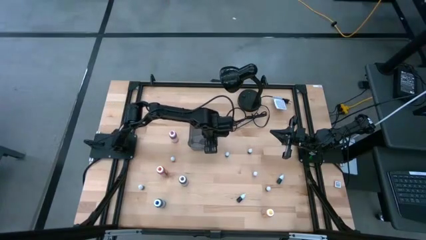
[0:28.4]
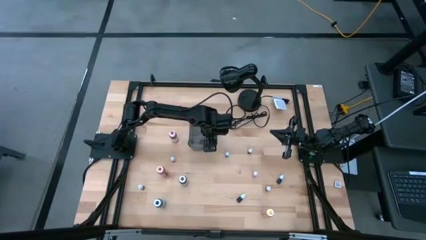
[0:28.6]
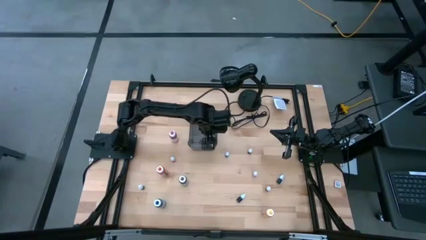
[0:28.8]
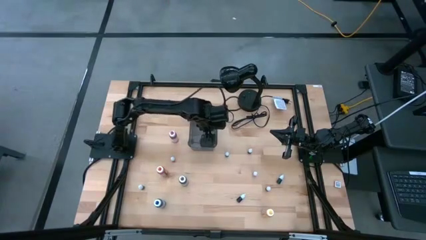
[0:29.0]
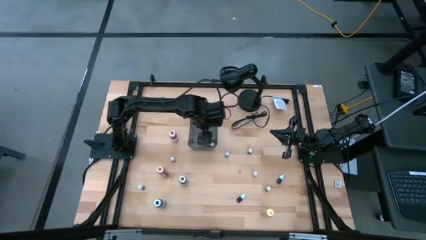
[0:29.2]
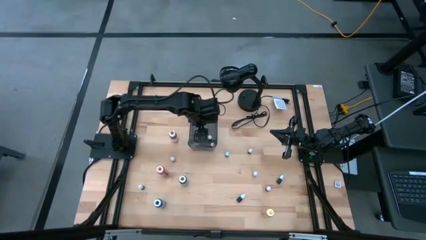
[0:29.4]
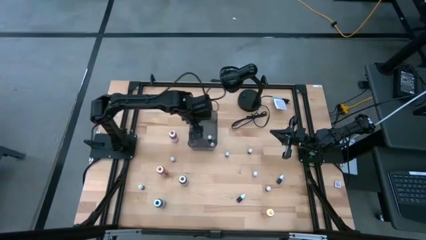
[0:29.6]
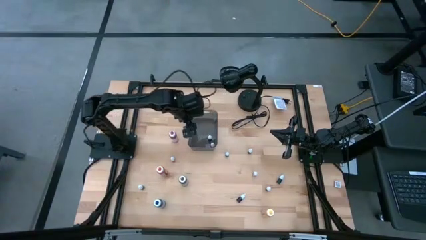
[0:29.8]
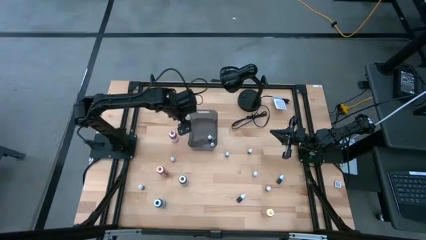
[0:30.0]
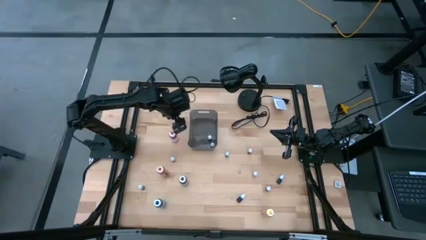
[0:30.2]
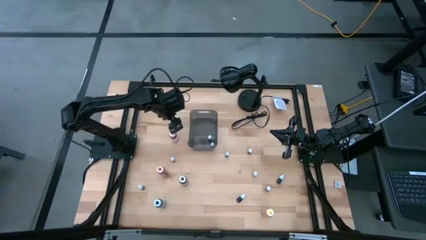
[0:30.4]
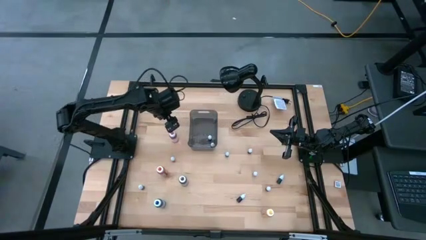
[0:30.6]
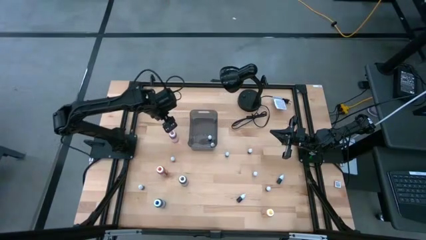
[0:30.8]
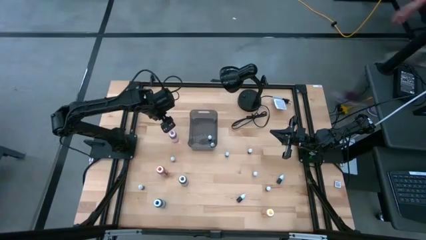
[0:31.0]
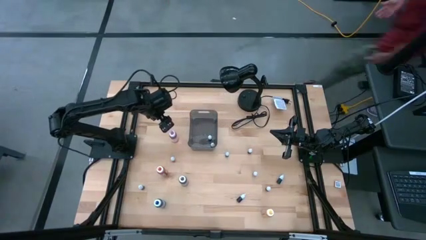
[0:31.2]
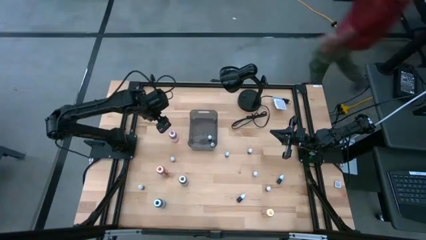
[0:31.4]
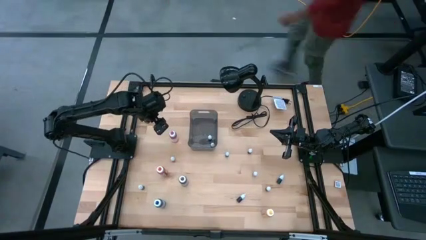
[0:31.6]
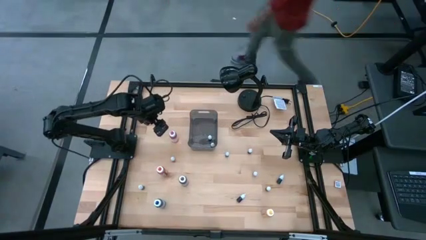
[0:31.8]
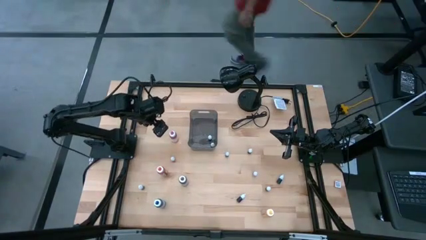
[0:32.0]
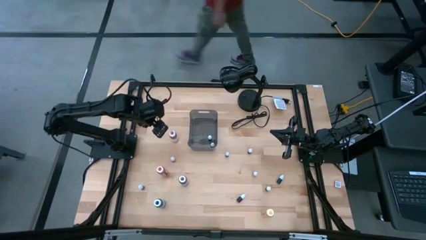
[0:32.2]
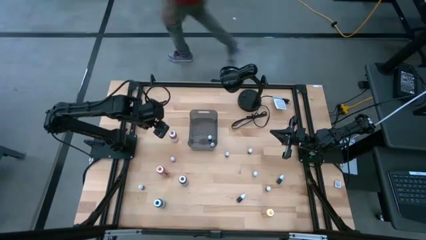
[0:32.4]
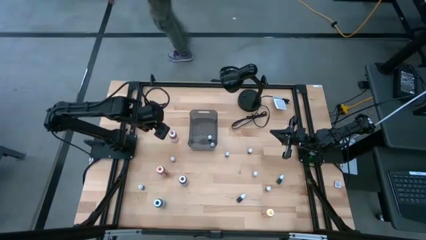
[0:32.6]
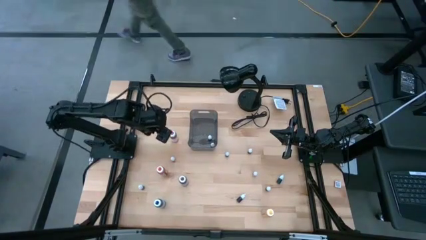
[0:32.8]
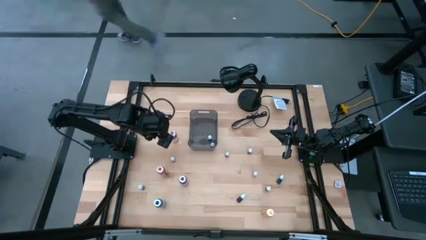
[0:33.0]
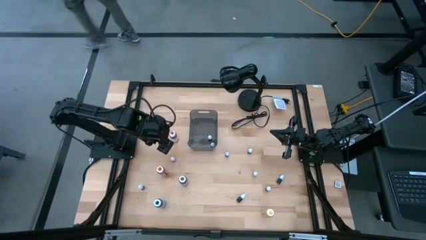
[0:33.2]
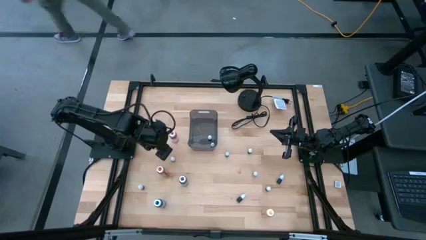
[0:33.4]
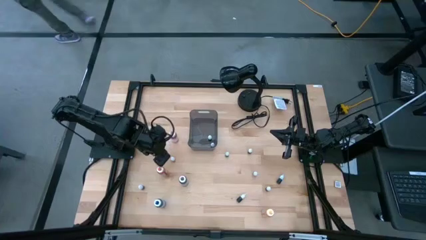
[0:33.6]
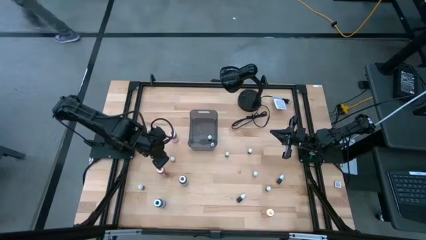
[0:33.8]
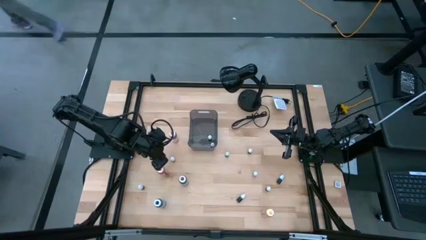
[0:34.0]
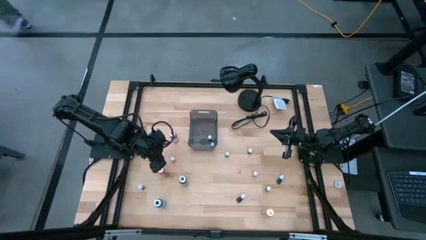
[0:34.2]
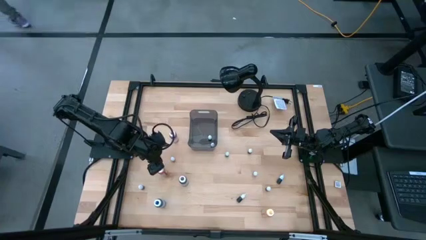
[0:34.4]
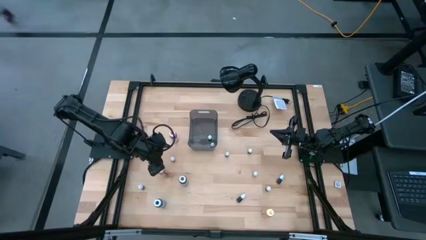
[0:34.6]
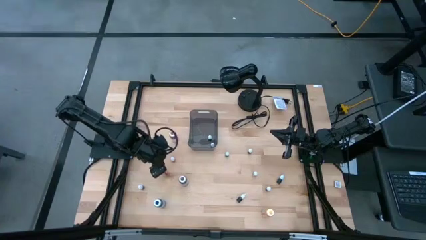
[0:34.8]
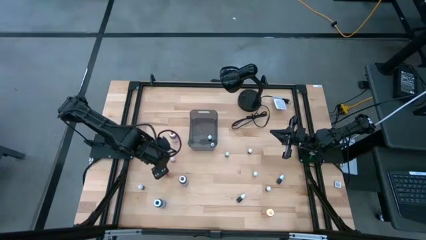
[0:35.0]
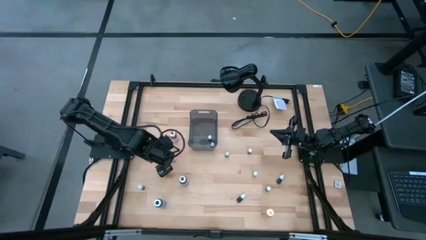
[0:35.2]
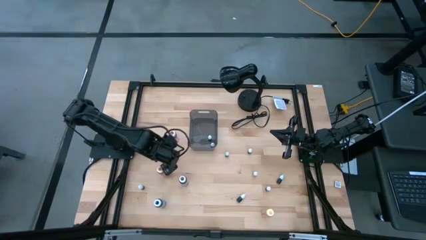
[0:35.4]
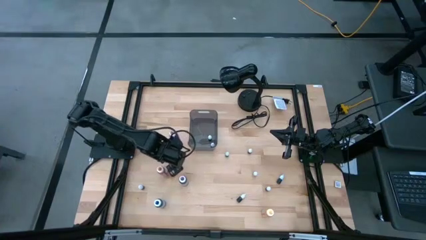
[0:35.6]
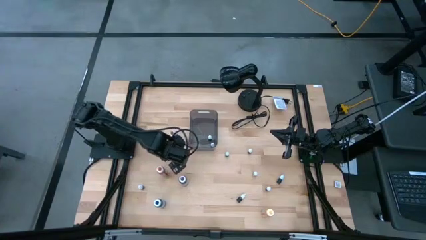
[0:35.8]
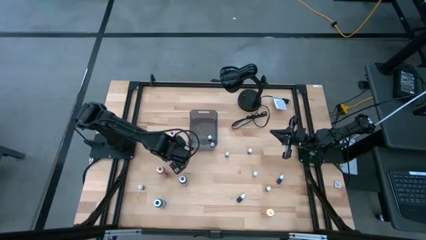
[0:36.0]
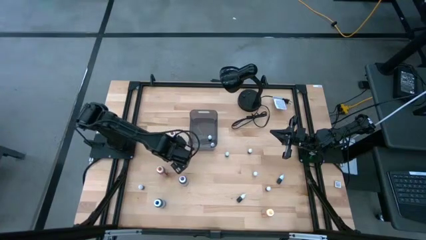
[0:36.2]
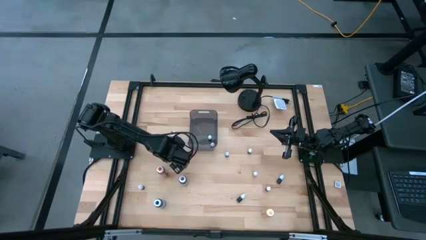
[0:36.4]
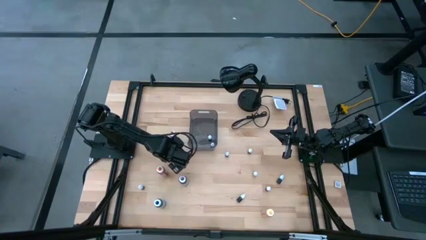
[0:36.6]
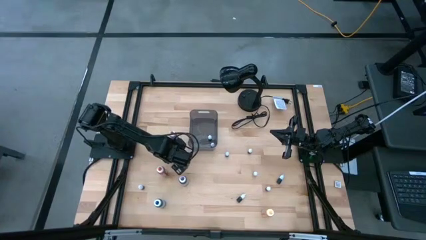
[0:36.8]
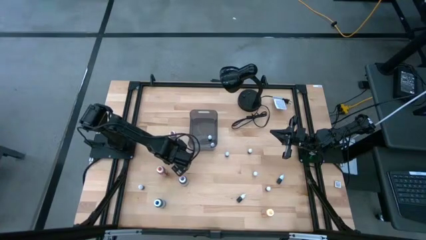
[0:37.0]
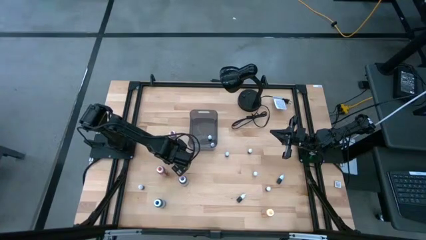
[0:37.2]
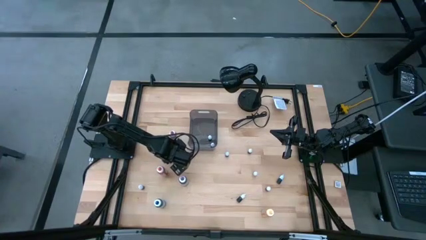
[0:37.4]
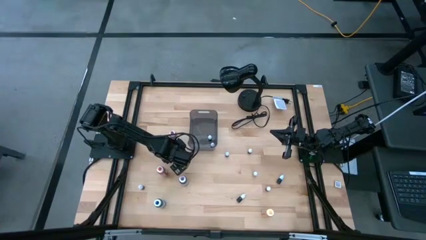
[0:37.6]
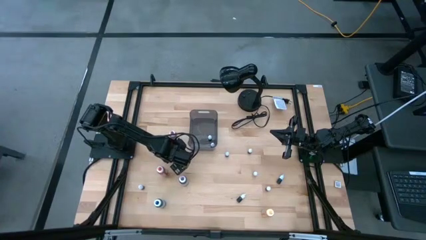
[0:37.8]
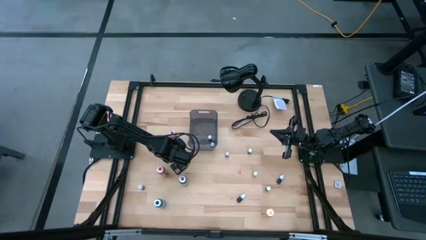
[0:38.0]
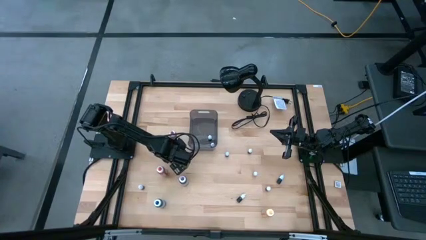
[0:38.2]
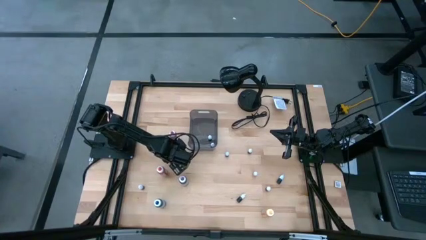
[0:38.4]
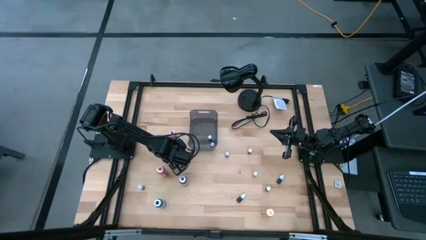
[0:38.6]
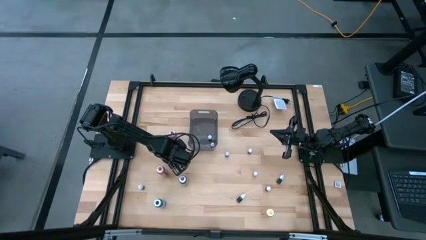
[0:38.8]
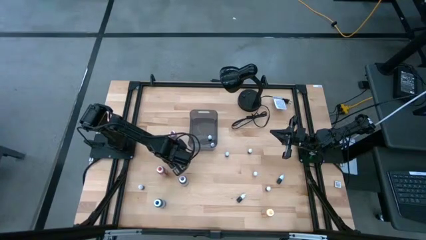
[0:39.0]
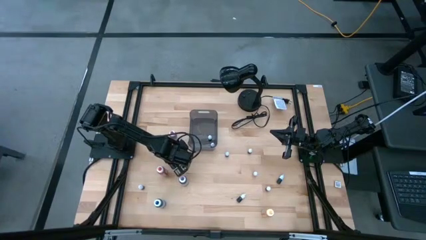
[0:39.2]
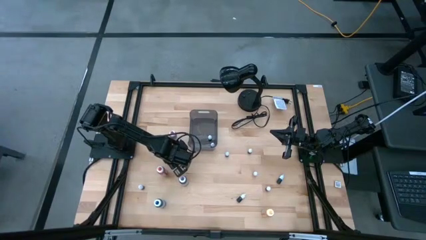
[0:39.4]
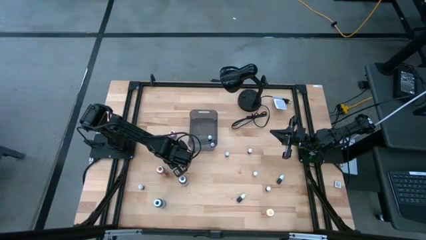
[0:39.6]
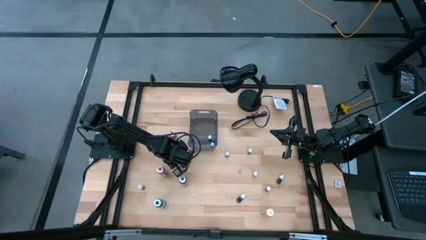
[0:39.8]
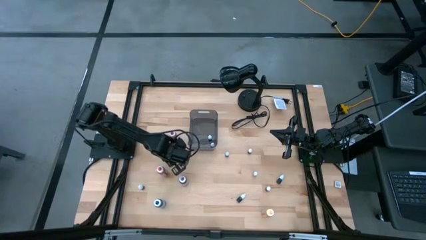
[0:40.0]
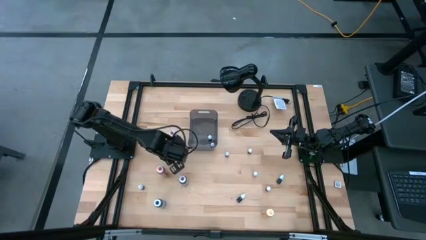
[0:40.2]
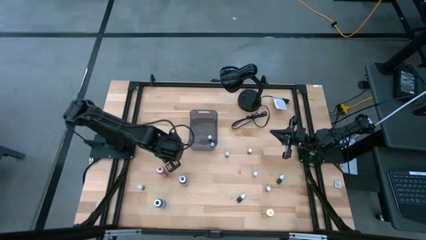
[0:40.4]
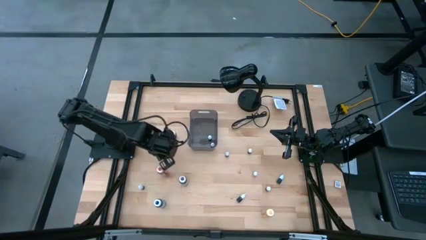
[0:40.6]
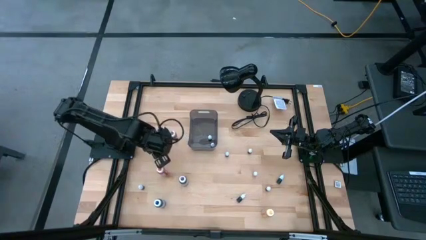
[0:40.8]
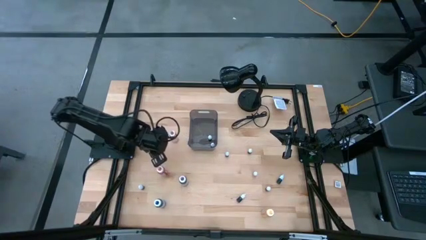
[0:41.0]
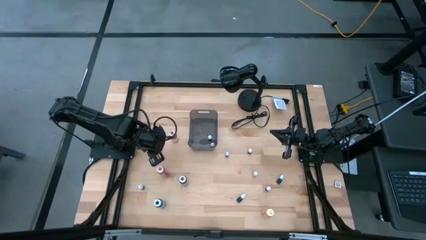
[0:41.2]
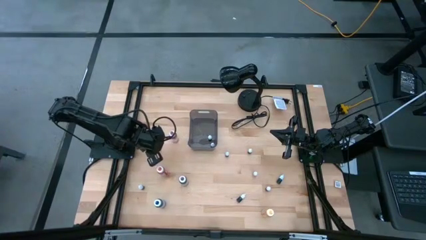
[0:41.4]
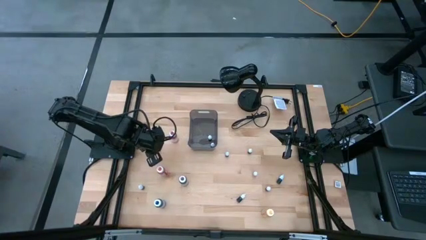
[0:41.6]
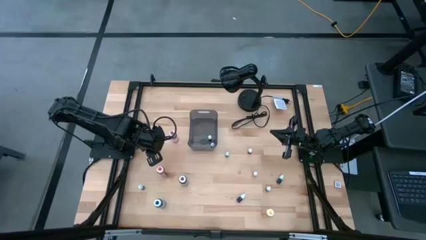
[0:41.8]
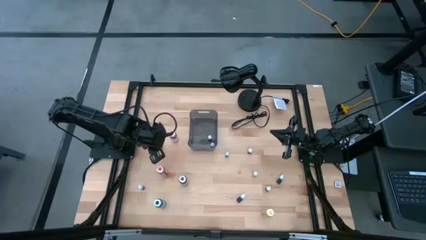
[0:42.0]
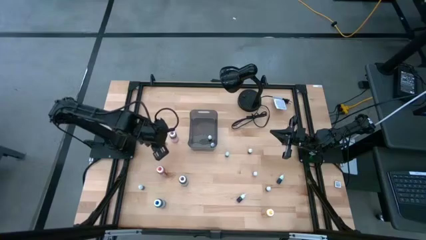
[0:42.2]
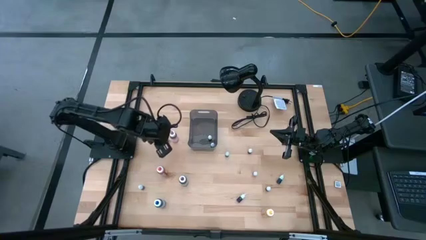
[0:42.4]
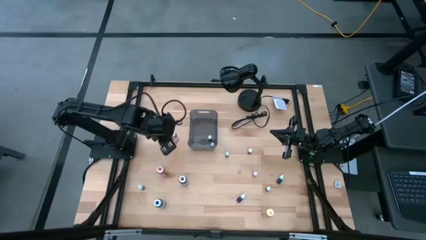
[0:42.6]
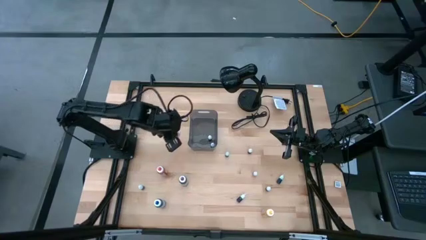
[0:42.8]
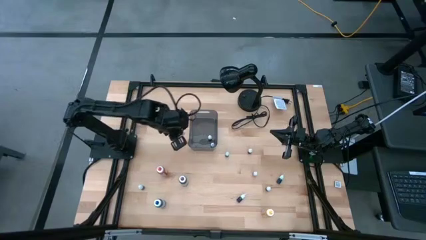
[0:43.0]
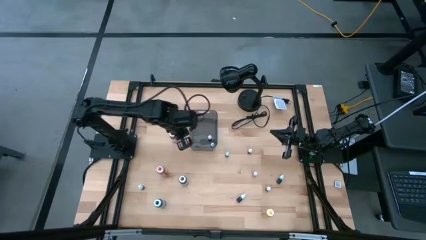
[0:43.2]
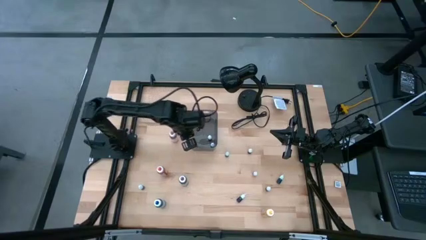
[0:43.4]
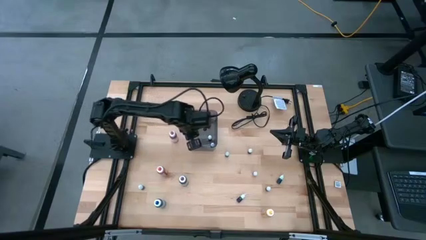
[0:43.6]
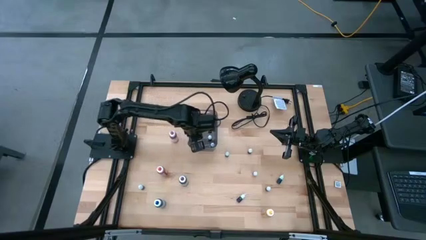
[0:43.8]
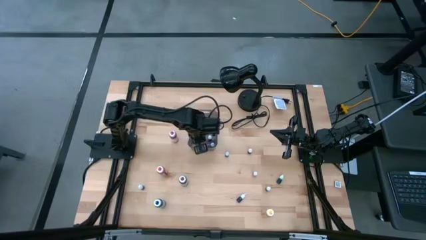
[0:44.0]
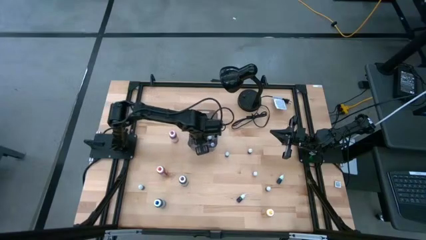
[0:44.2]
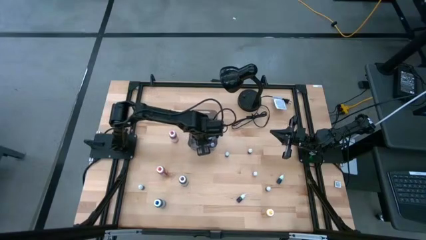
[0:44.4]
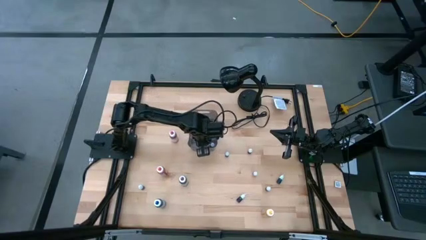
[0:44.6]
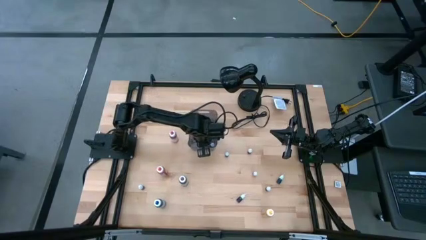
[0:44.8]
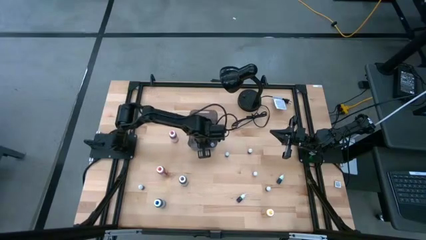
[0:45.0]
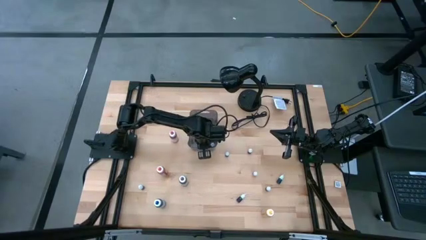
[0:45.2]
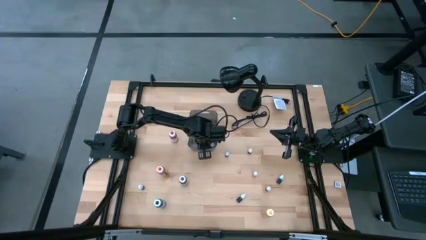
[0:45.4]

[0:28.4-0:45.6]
Task: Pick & Place food coloring
Put the small pink food coloring bottle into the gray transparent bin
